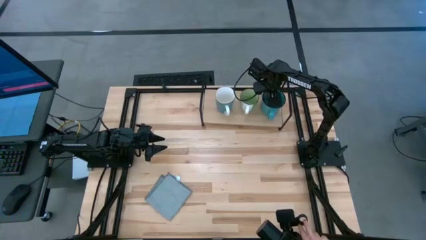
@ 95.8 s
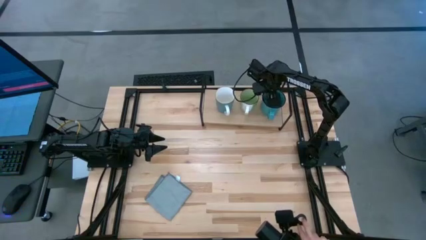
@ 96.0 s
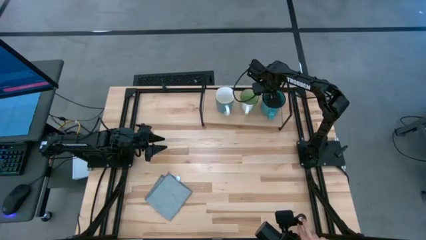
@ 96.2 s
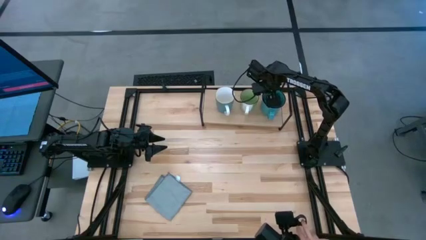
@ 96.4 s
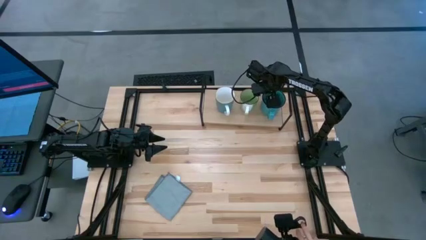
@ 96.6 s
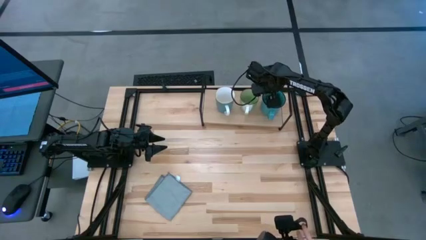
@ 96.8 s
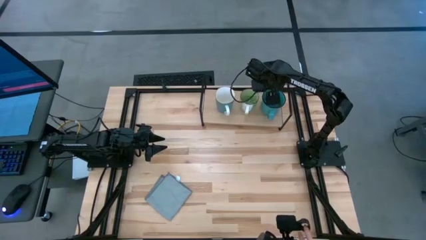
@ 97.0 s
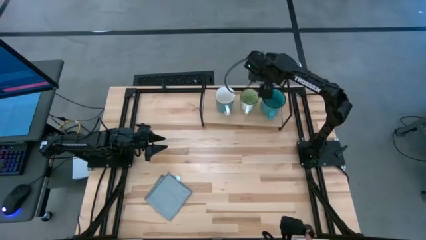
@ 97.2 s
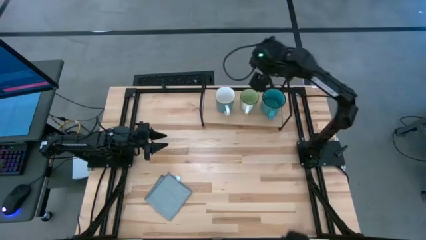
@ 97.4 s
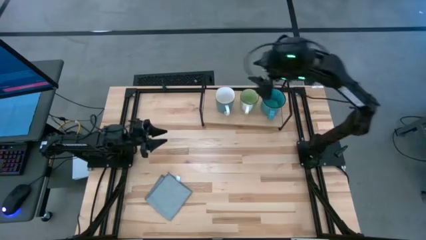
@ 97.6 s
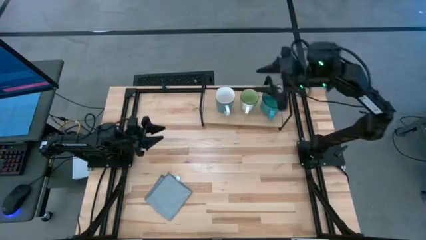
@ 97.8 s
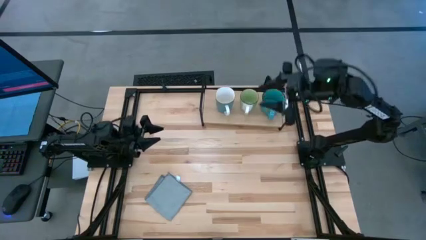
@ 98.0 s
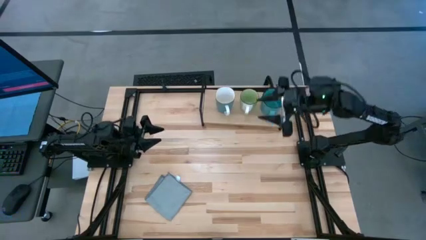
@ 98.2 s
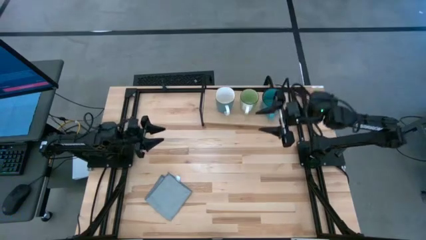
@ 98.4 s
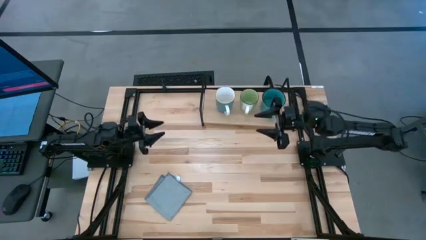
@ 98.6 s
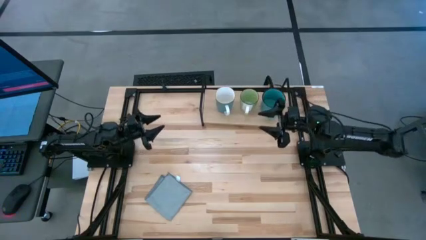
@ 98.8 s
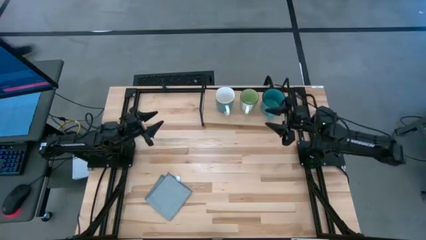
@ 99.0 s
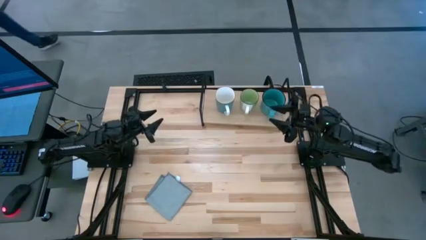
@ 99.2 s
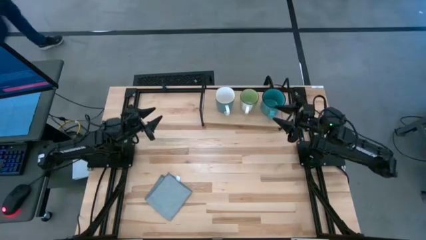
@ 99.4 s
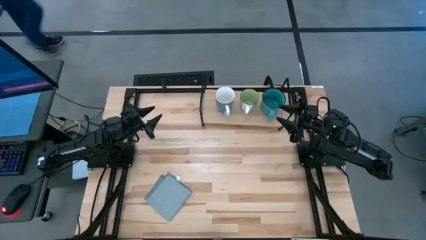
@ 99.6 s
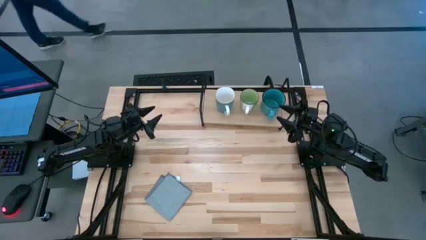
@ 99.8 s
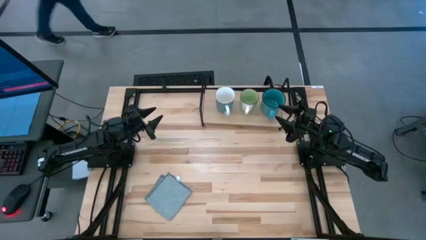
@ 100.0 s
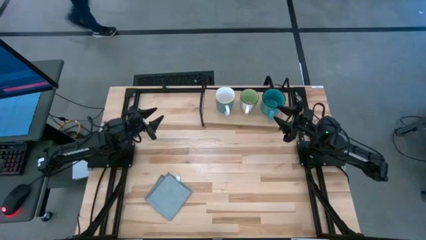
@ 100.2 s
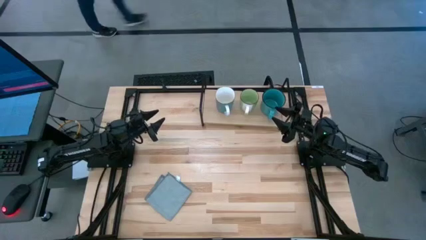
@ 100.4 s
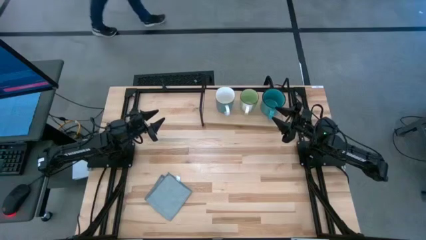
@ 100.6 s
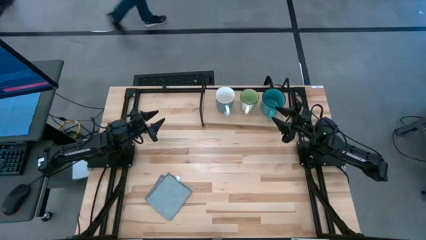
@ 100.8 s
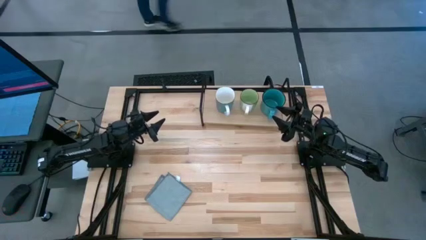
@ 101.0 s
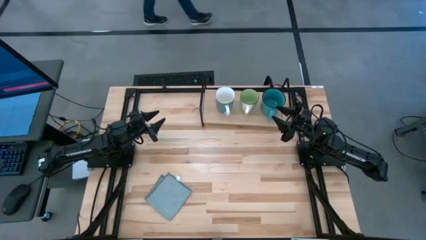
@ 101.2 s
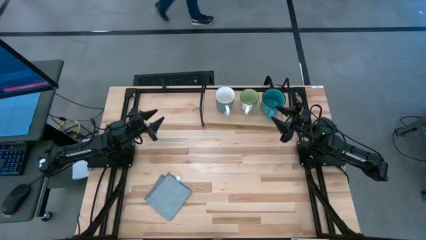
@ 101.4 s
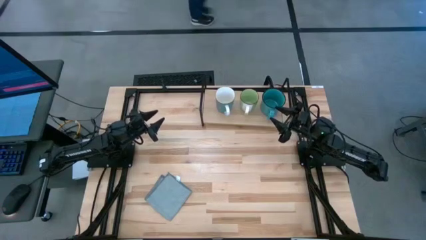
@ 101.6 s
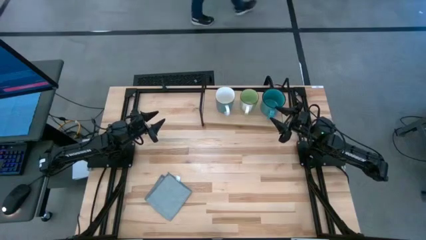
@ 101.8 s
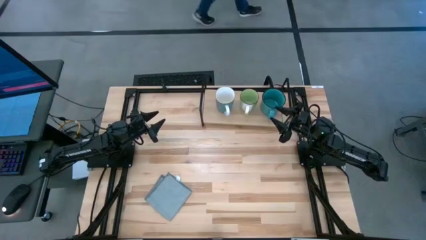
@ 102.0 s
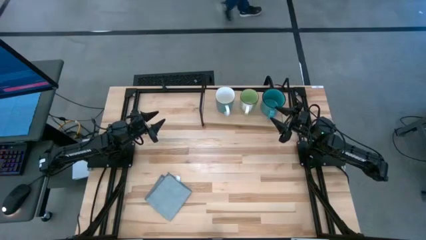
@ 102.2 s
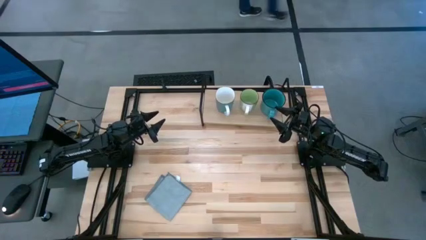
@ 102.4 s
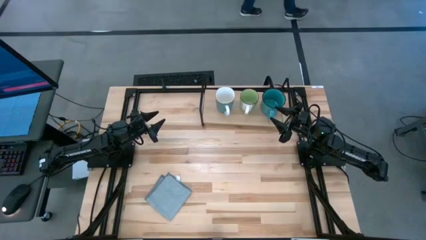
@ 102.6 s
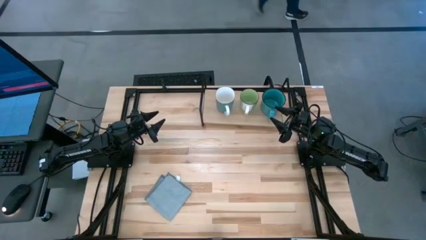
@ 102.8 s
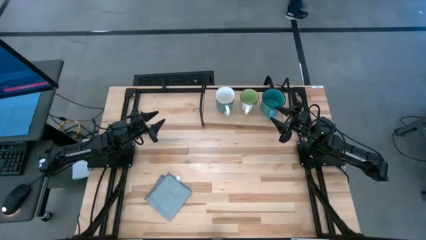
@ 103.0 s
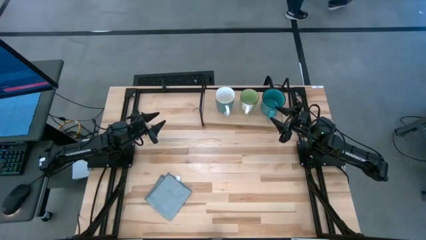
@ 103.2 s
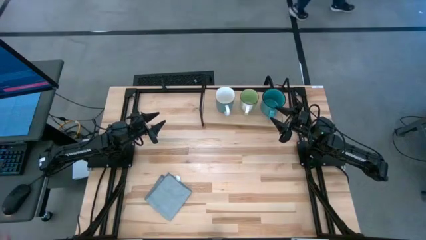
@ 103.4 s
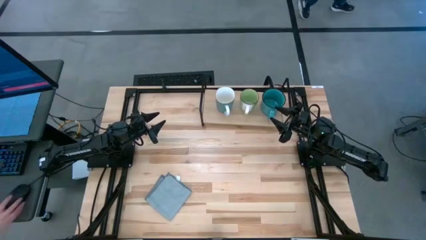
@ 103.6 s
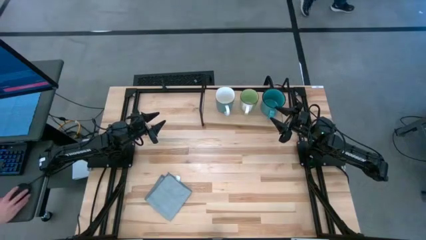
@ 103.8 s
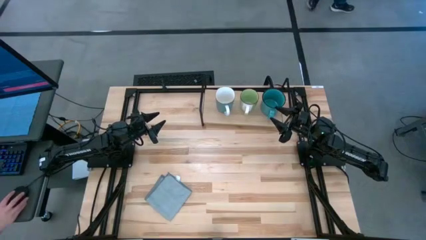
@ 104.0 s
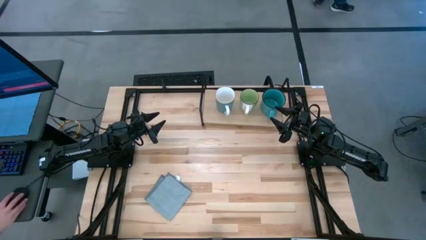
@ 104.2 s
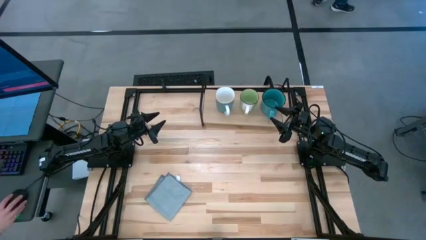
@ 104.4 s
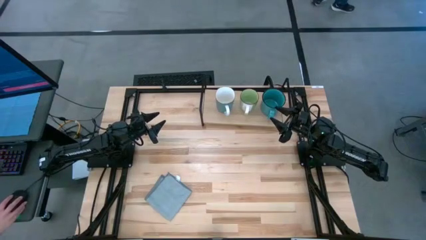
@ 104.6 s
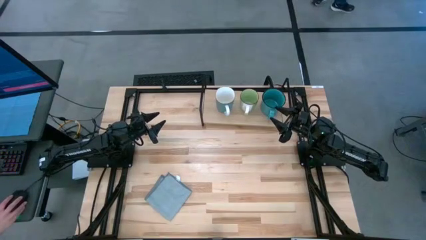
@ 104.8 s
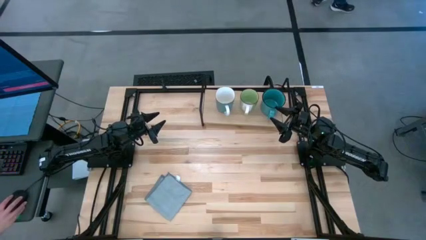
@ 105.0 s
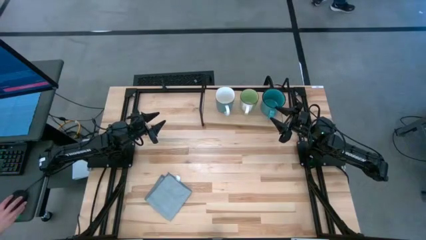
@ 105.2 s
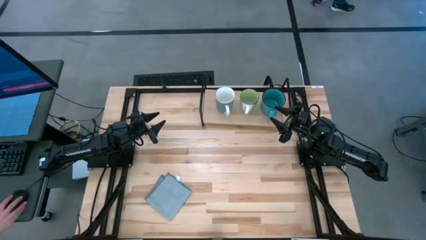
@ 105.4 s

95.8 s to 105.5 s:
Task: Stack small to large cups/mugs on shelf
Return to Home Position
